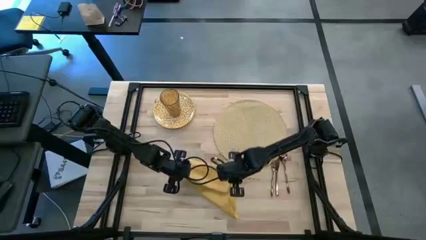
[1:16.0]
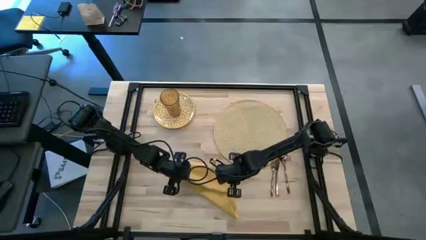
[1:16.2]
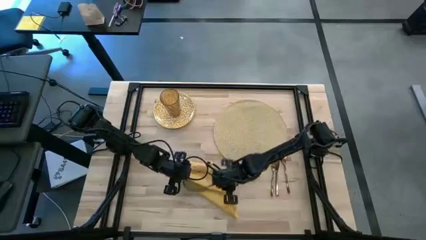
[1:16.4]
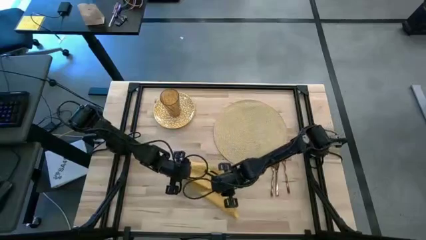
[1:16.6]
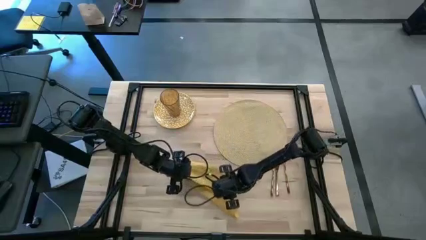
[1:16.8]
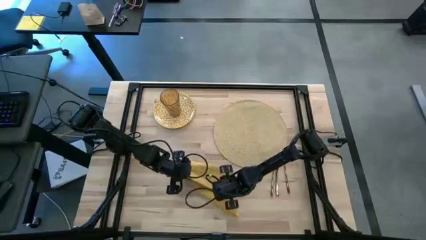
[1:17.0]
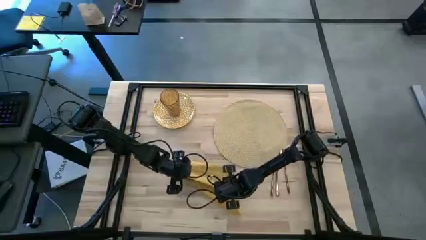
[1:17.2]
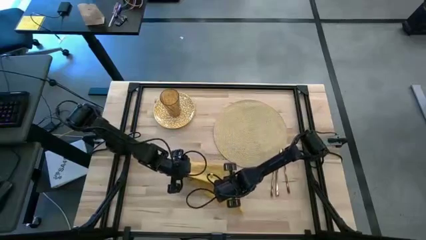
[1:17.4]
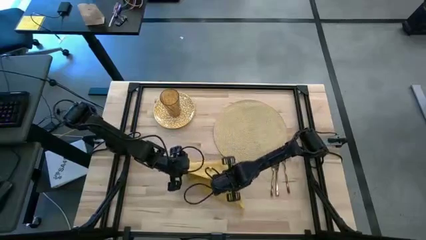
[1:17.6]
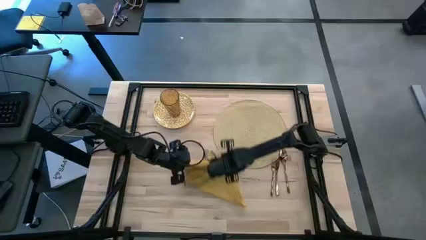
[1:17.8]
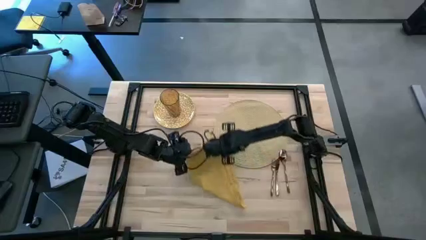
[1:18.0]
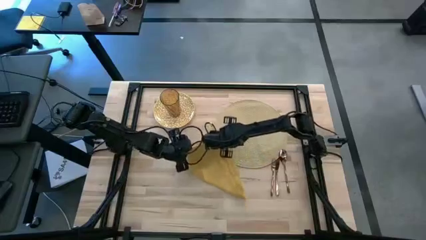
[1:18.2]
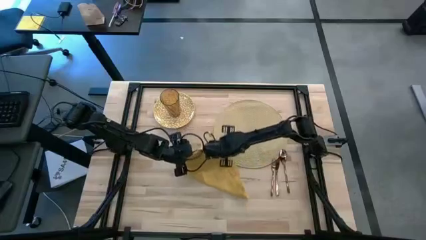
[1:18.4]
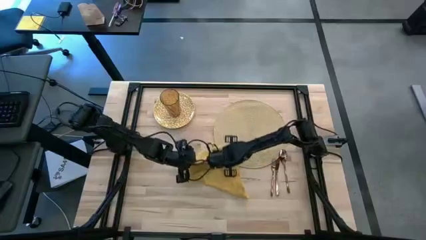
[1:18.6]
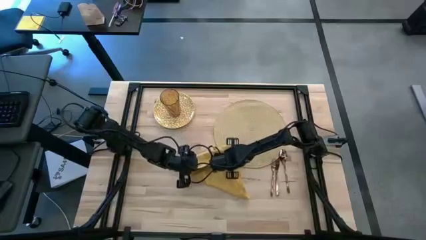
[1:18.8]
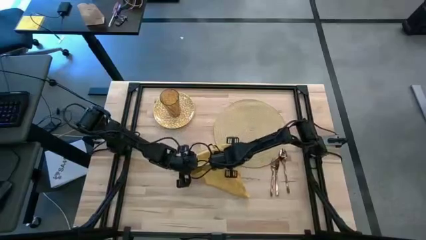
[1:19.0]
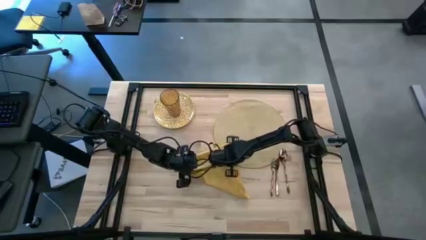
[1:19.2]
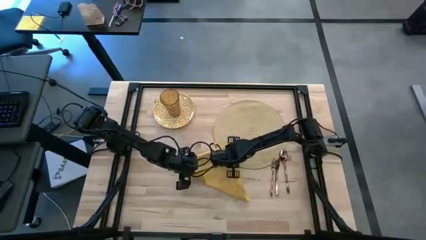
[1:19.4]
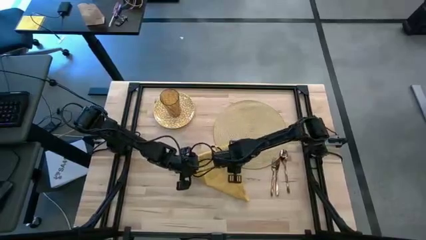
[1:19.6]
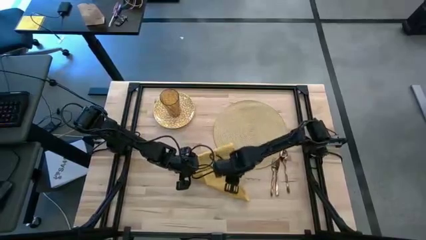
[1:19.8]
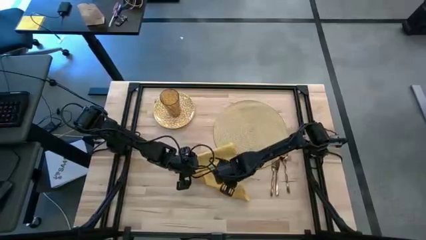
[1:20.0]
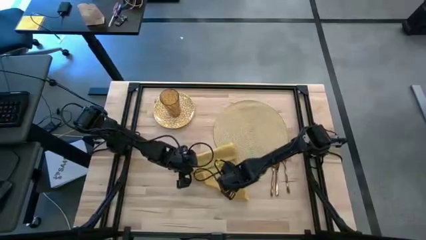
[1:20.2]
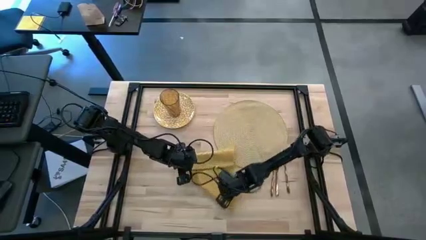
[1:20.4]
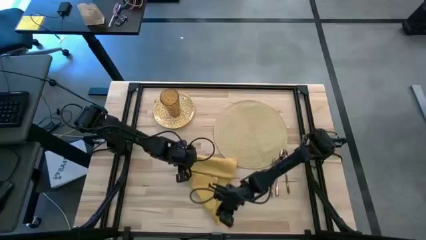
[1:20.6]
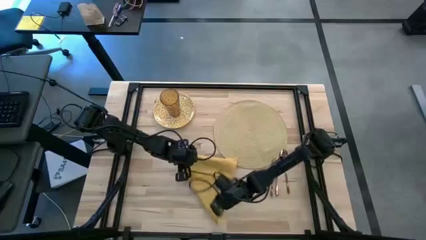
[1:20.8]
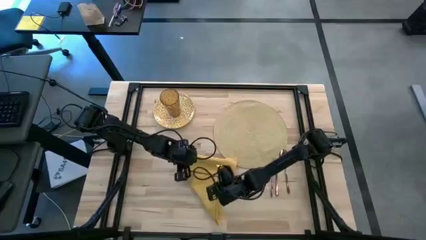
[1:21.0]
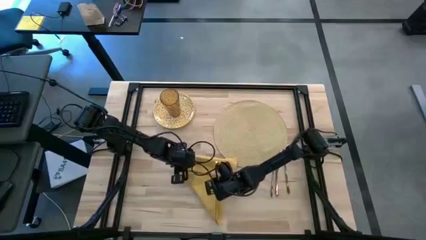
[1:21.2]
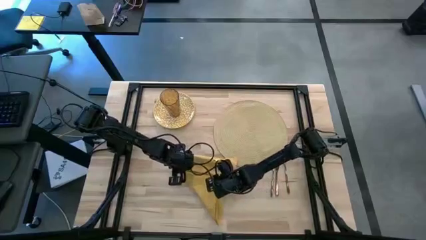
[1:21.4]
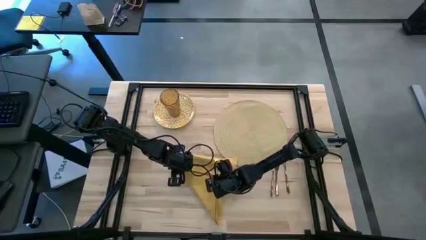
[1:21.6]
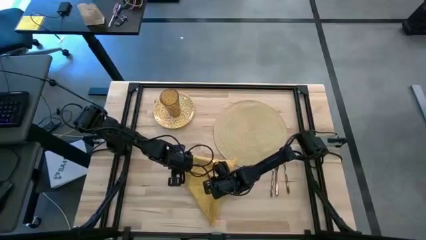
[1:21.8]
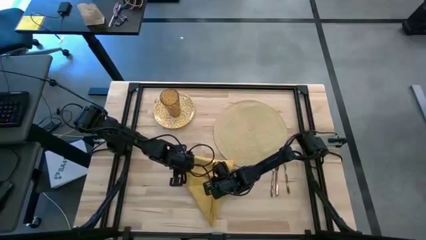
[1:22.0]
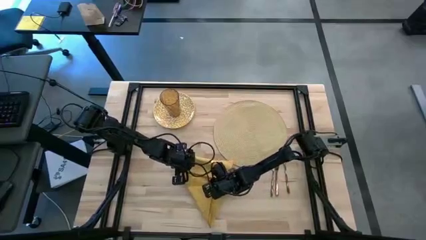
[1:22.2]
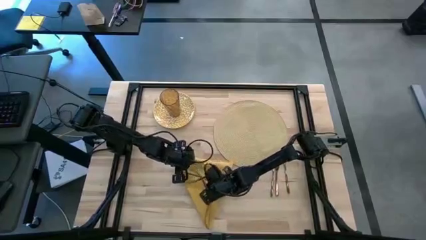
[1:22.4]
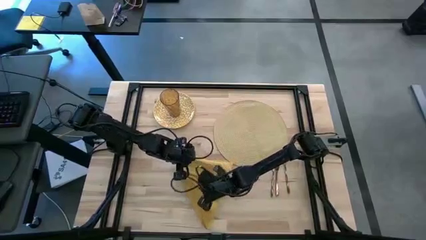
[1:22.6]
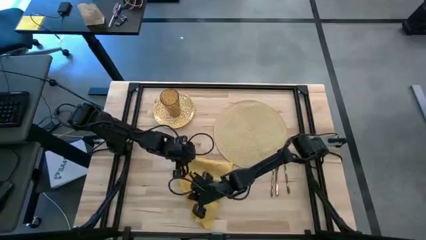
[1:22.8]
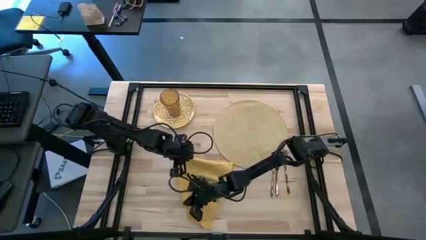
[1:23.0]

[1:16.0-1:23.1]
Task: Set table place
Fold the yellow table napkin

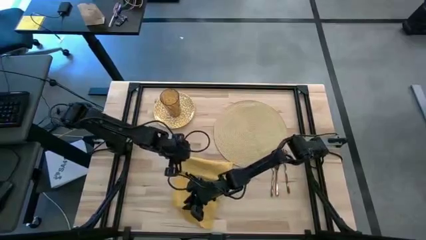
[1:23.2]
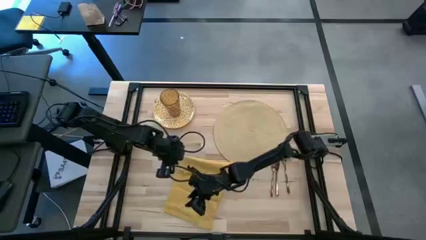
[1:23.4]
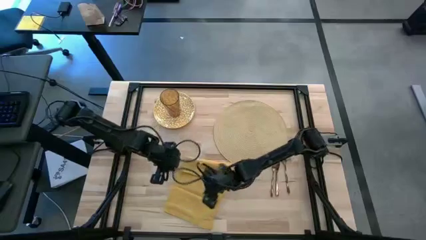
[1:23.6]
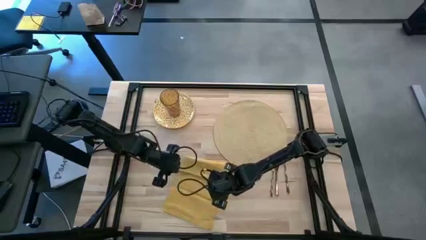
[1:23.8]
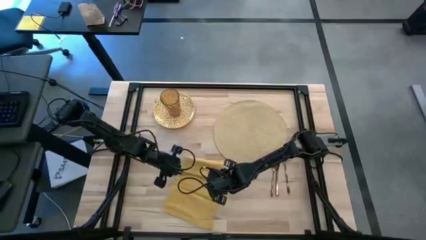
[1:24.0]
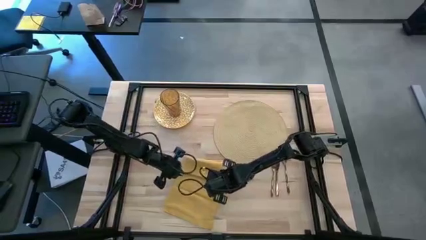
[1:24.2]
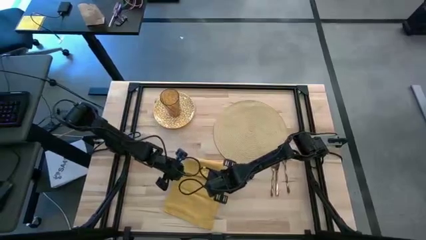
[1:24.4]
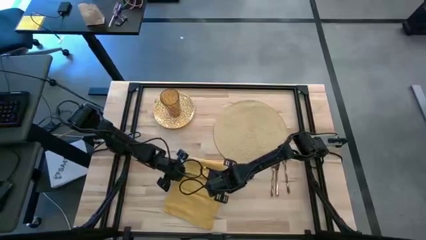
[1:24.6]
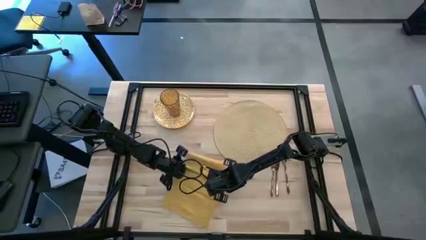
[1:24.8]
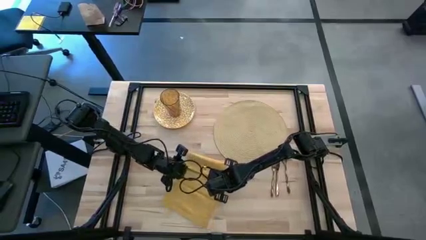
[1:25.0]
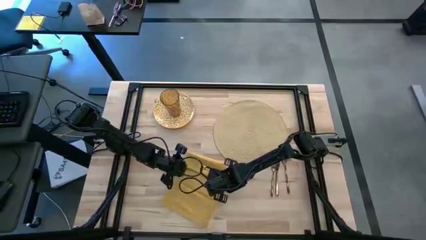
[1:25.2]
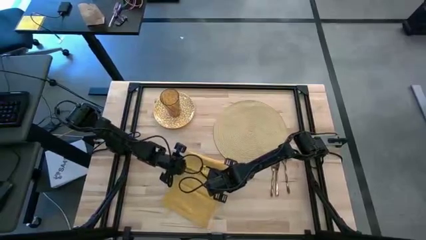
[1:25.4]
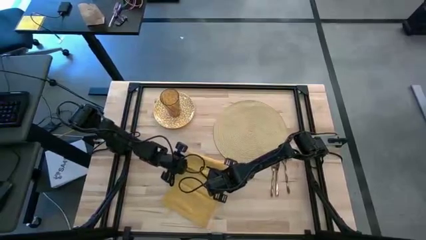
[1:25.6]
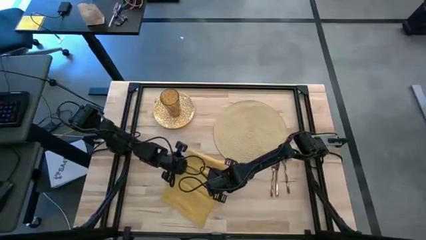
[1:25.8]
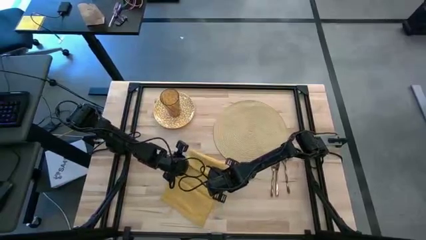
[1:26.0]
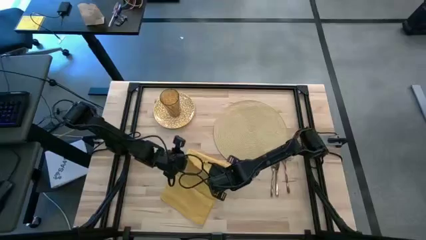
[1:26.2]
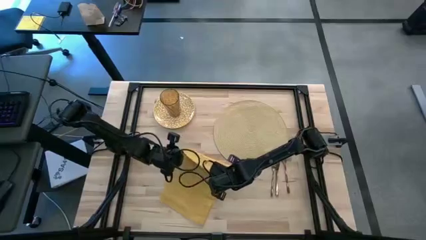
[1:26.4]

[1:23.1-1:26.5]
Fold the yellow table napkin
